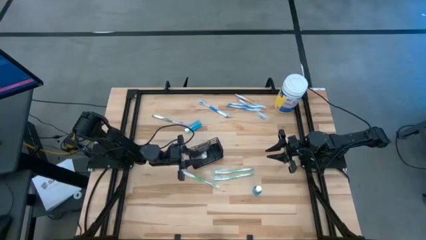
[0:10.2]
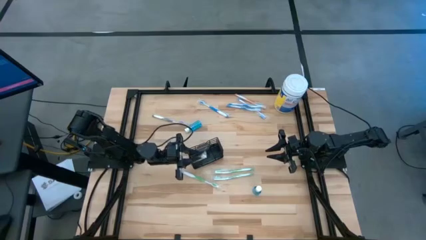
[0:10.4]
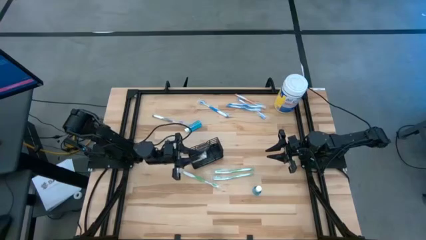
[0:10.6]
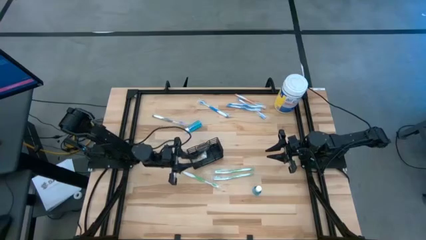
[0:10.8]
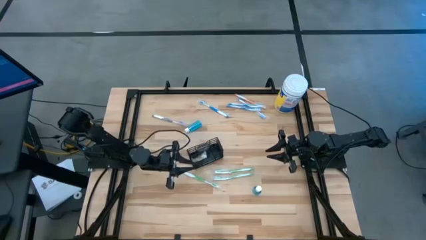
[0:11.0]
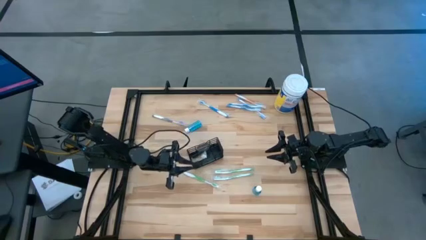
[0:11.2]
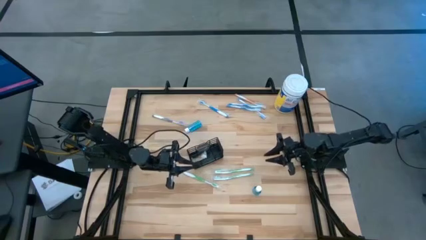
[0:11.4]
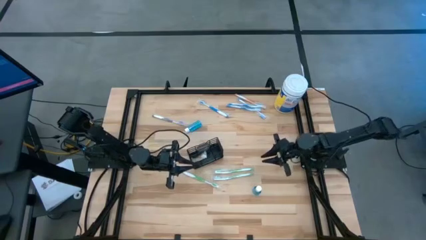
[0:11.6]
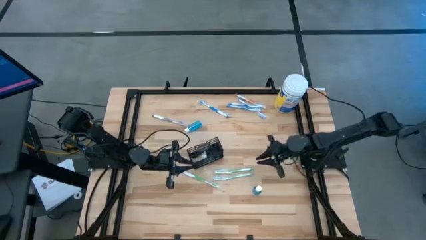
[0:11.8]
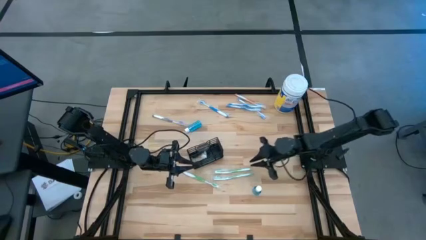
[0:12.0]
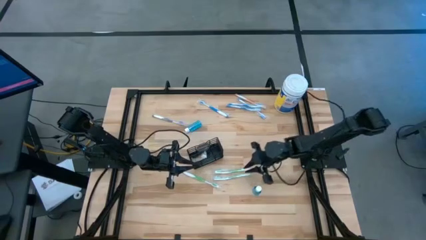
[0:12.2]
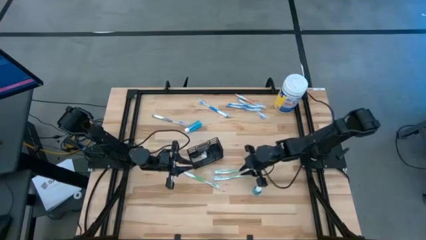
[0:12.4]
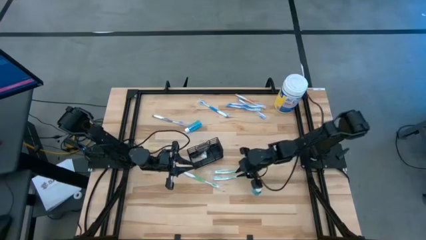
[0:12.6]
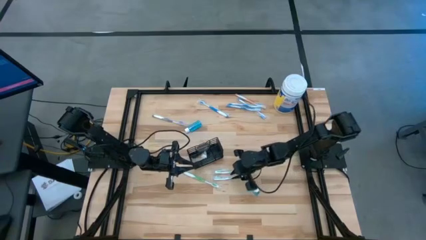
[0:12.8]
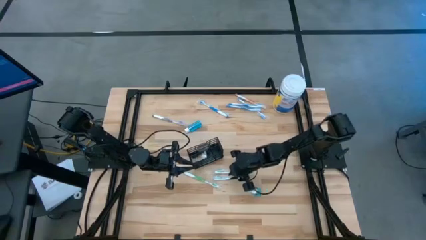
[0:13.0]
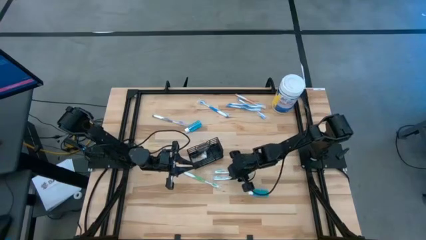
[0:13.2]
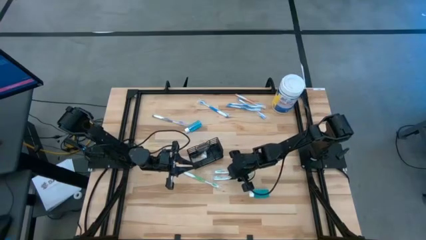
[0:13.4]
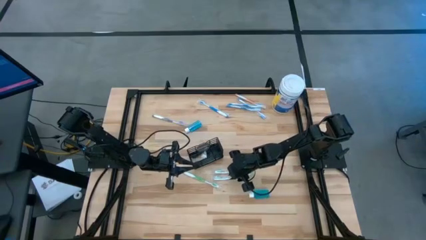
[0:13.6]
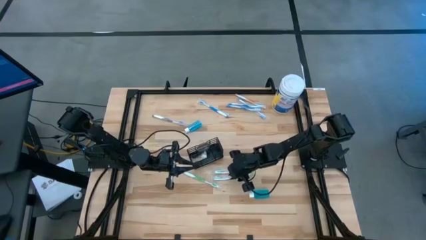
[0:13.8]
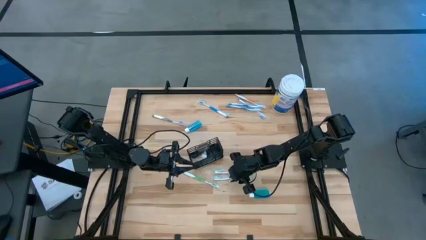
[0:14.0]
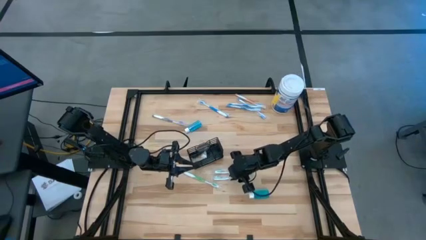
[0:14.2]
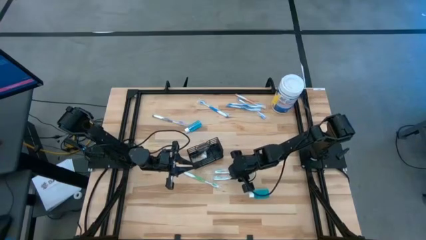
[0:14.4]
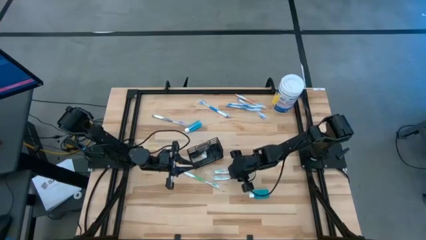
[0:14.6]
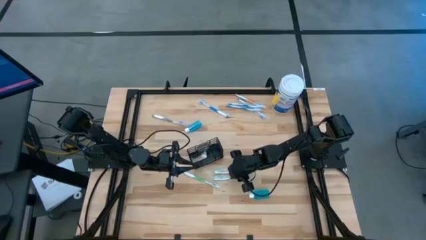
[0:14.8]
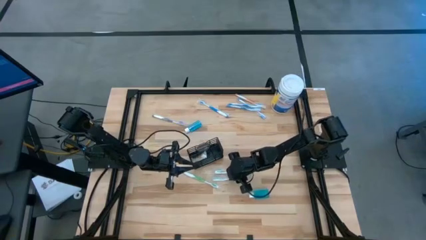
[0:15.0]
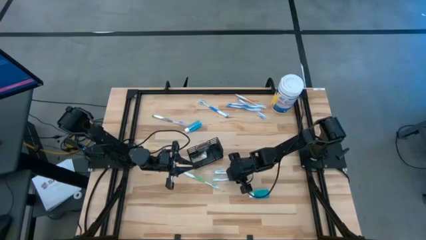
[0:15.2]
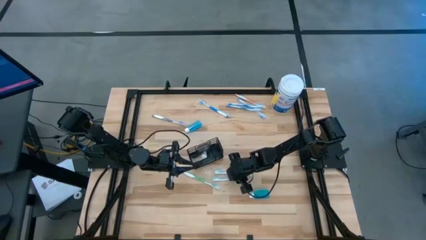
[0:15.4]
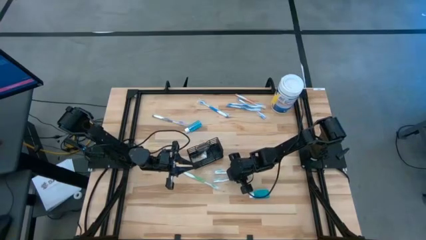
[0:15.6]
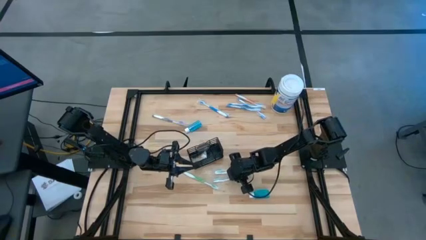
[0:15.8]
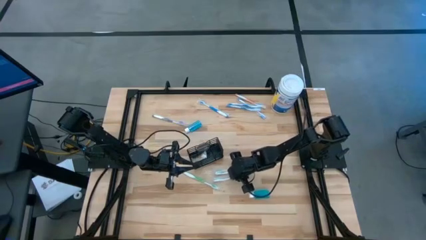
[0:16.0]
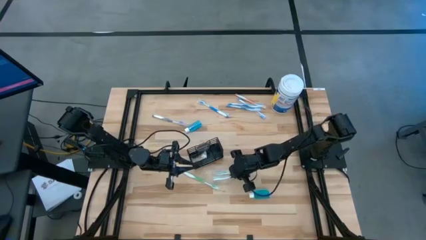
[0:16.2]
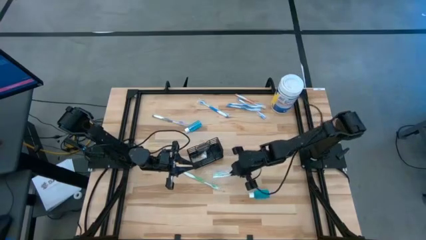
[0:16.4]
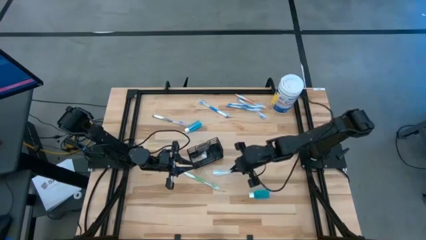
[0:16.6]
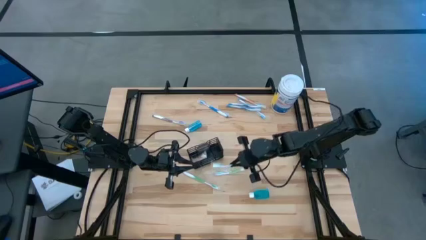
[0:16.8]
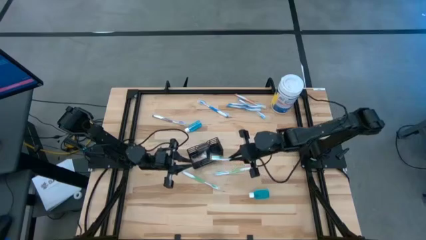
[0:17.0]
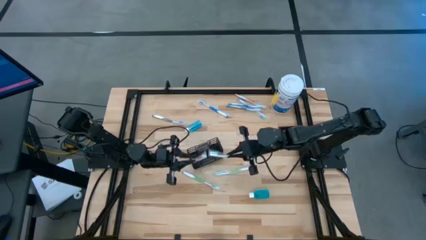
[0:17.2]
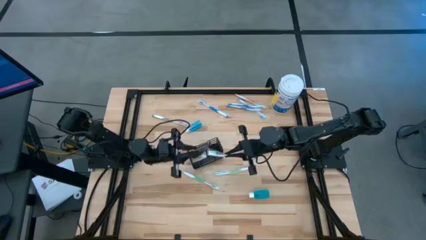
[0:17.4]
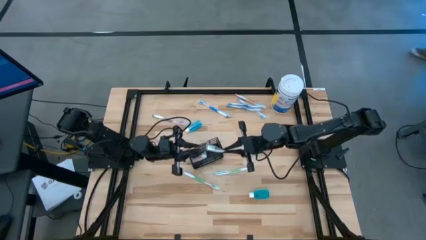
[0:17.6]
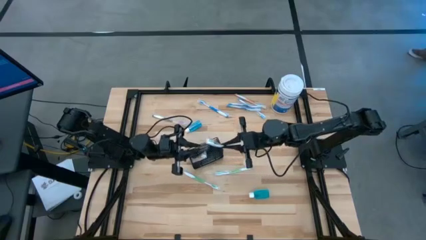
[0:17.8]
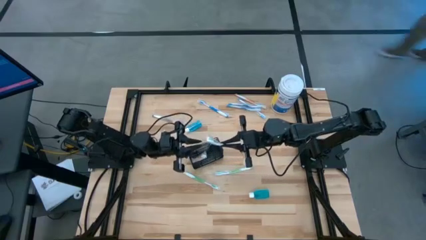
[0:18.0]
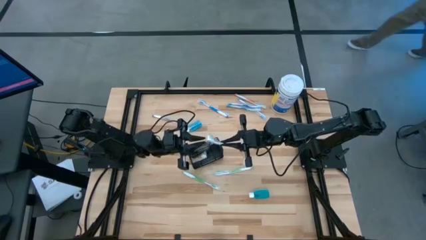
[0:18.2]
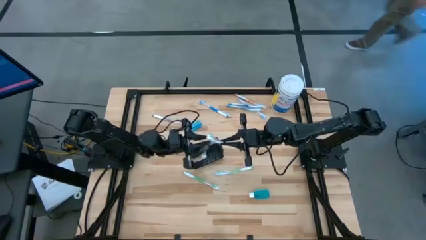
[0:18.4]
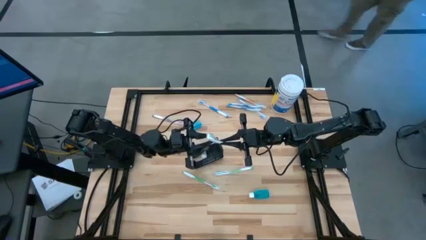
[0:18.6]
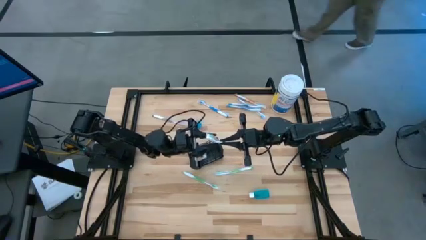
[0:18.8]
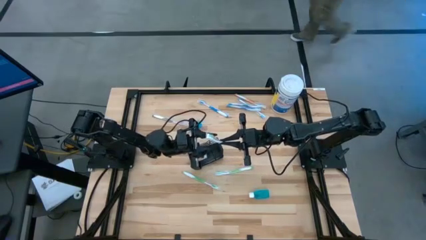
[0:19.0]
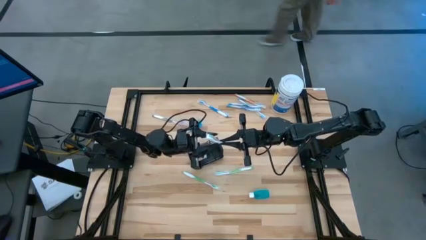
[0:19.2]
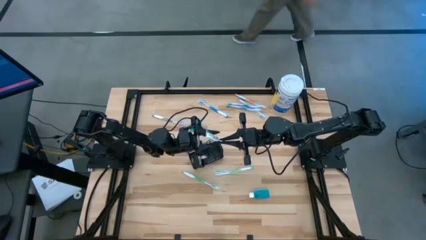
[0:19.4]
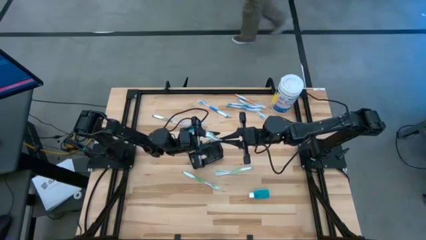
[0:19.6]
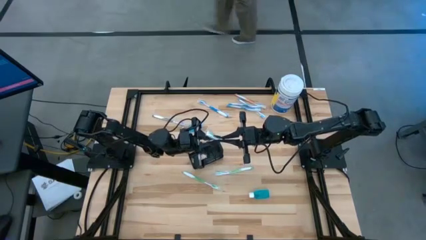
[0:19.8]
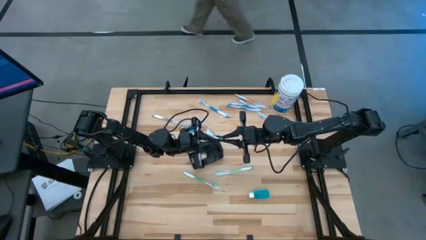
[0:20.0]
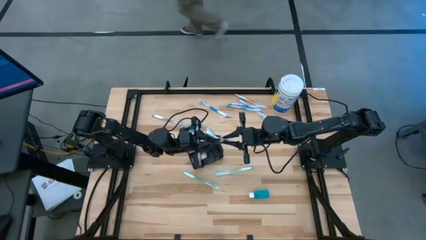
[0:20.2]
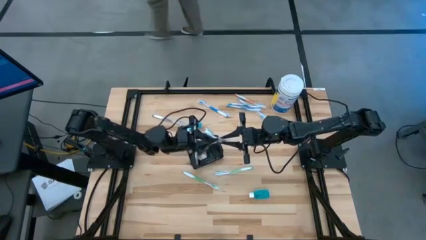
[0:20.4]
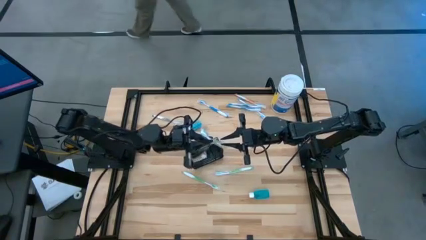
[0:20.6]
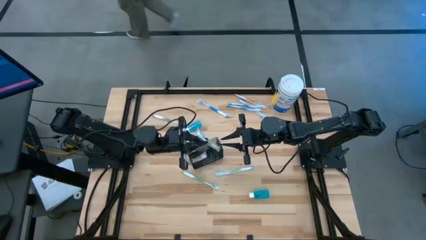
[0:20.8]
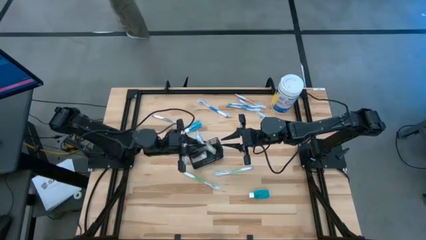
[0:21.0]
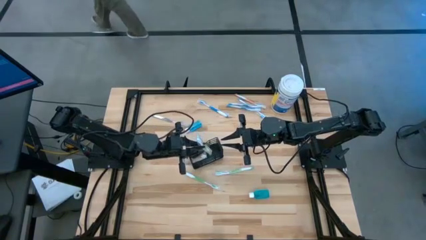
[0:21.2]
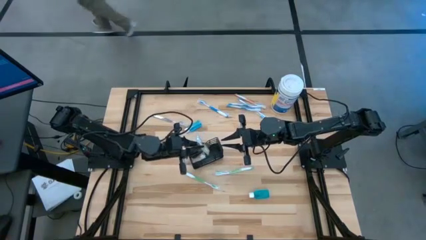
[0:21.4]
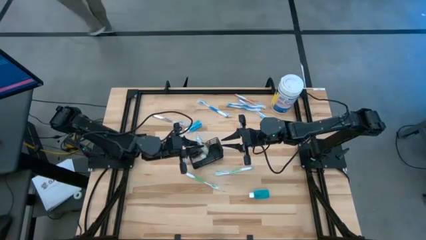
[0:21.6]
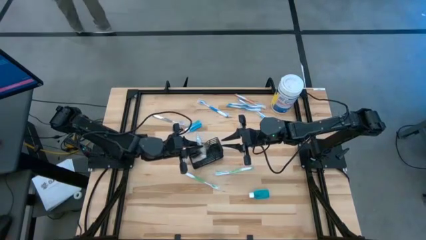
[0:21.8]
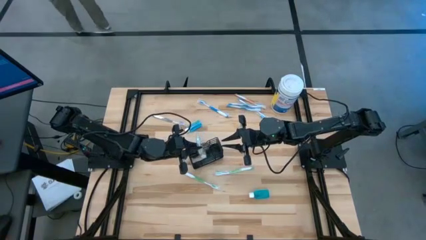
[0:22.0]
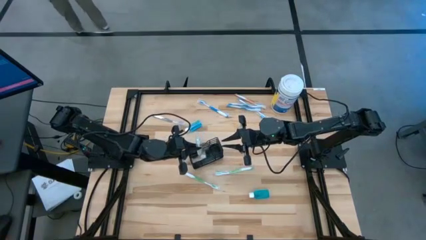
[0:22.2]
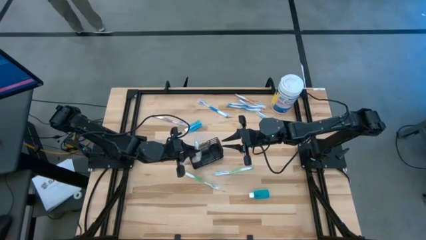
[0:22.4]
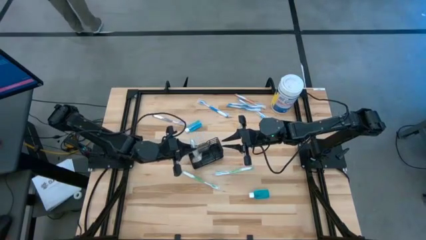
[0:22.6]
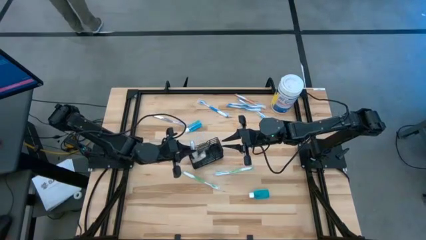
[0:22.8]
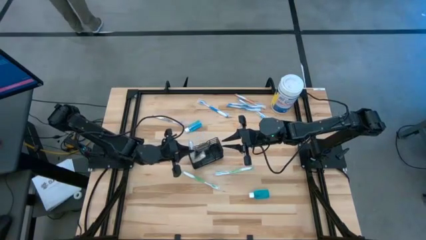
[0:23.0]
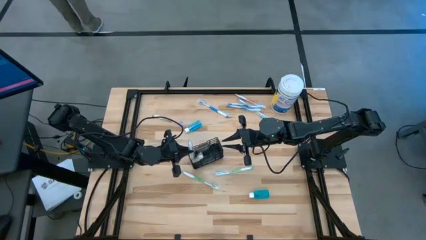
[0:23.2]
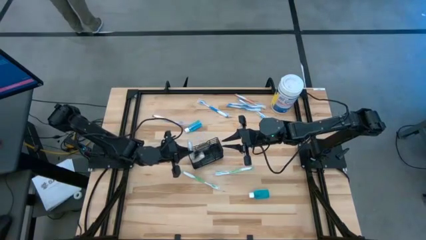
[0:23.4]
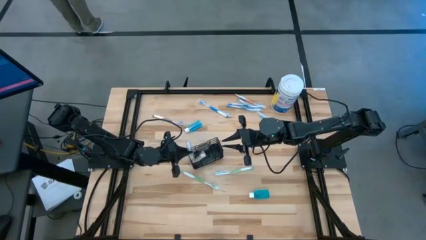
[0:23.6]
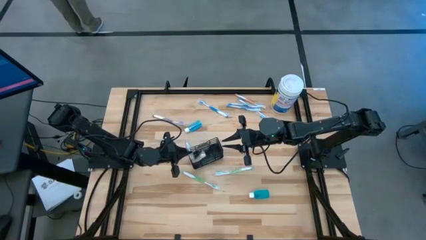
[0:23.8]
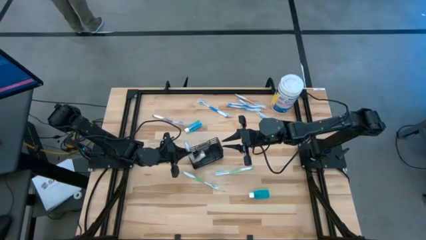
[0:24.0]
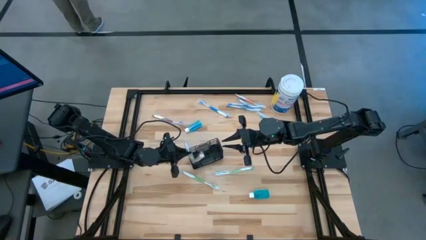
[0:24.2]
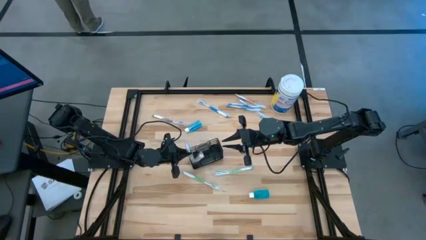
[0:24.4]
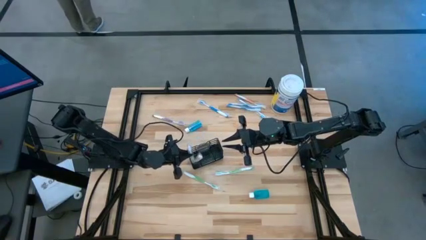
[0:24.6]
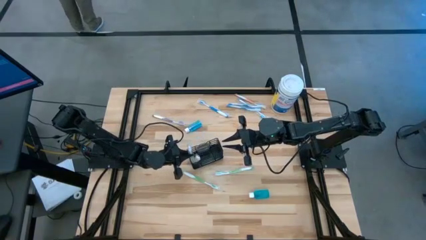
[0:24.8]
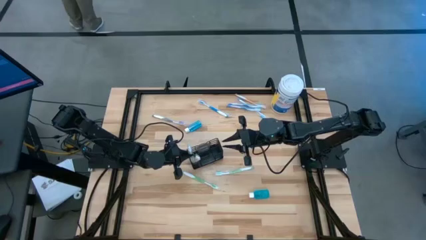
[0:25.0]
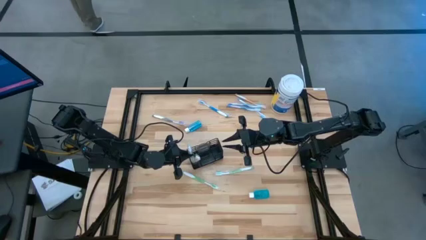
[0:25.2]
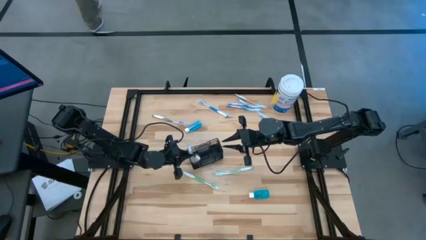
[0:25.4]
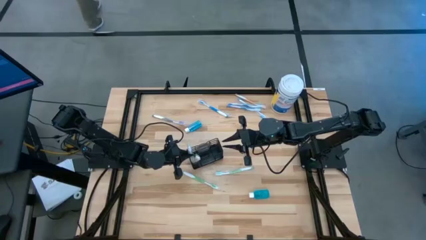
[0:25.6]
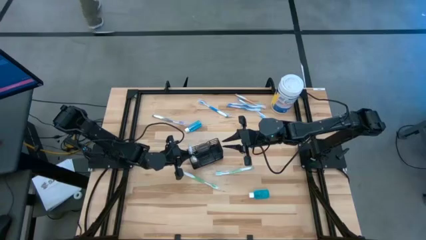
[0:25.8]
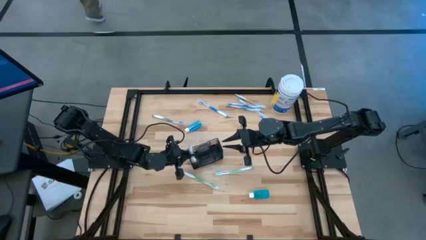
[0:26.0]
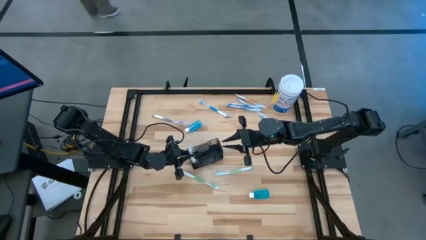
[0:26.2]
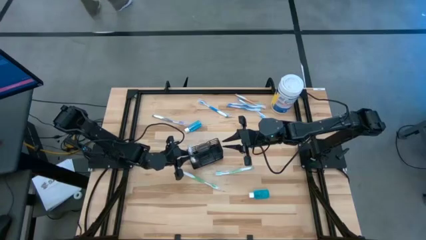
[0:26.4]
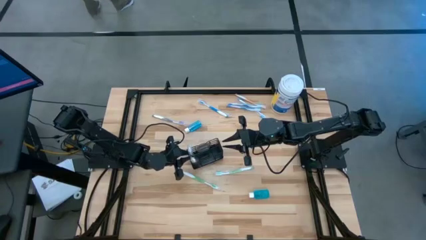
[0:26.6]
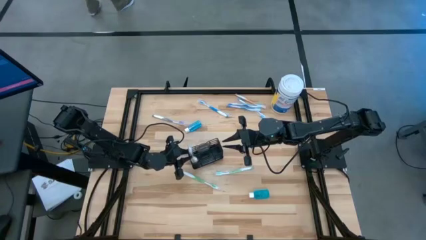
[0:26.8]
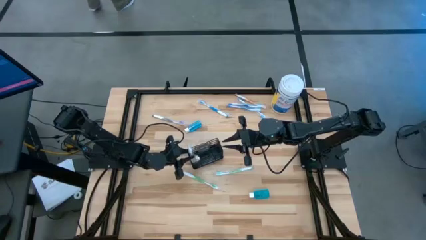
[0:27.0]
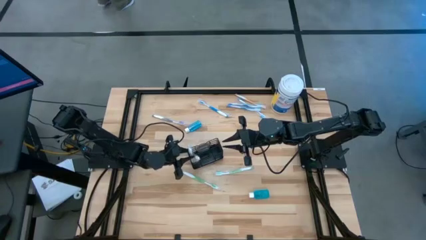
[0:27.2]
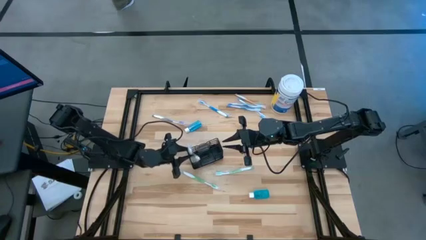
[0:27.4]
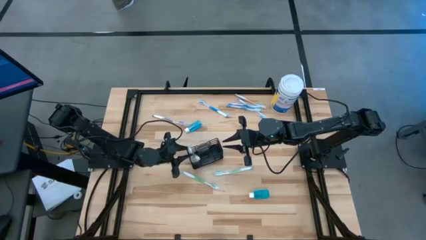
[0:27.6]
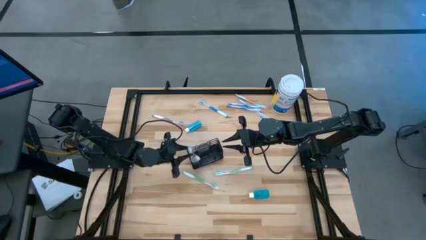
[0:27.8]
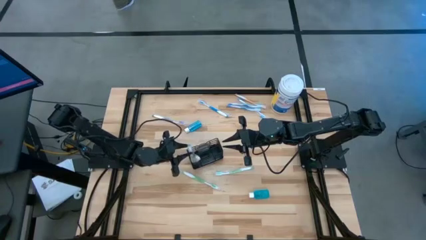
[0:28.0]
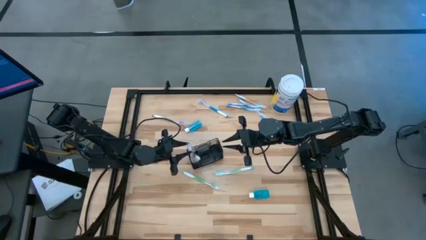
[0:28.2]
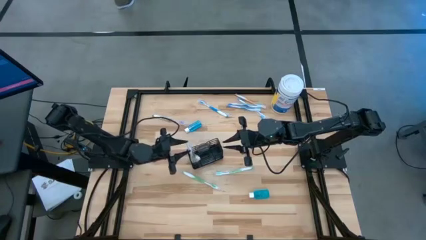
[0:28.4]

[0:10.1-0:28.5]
Task: Pick & Place toothbrushing station
Put the green toothbrush into the wire organizer
